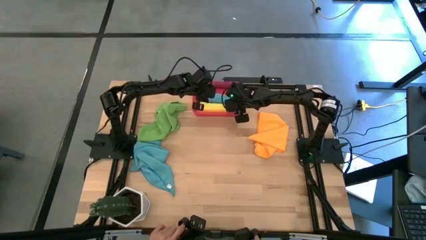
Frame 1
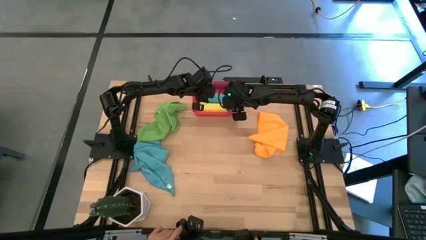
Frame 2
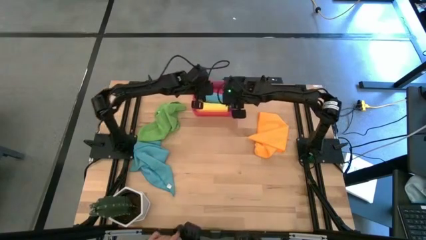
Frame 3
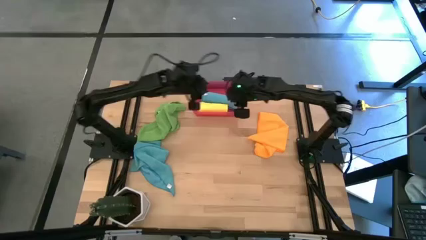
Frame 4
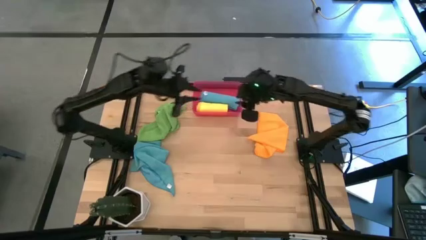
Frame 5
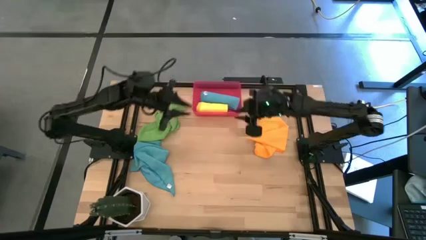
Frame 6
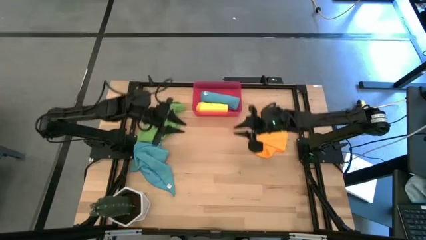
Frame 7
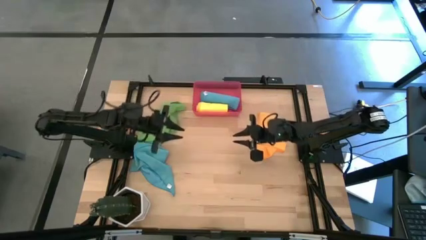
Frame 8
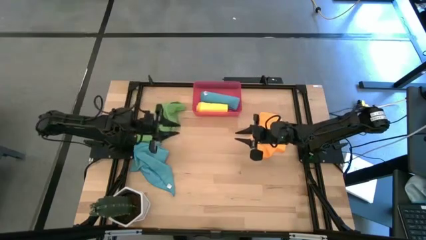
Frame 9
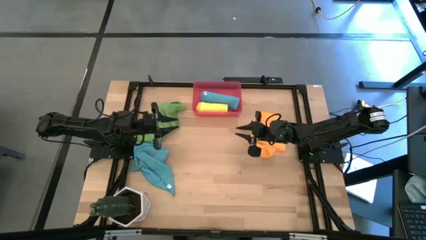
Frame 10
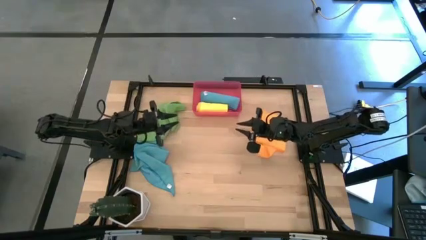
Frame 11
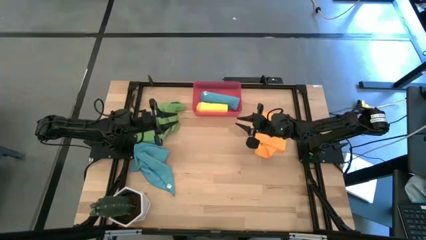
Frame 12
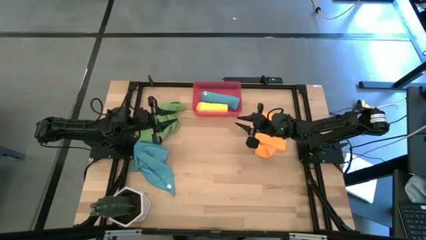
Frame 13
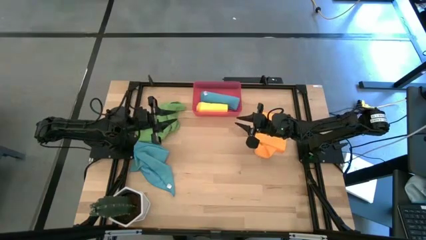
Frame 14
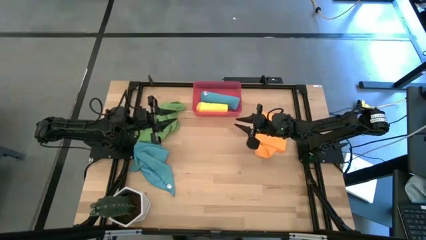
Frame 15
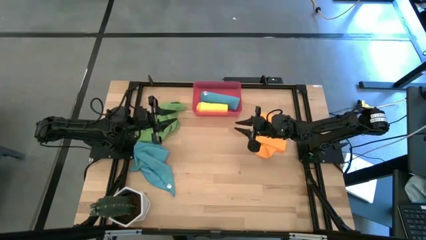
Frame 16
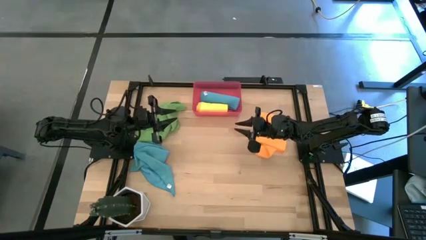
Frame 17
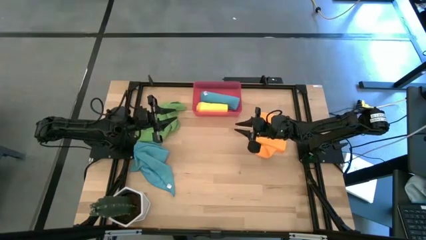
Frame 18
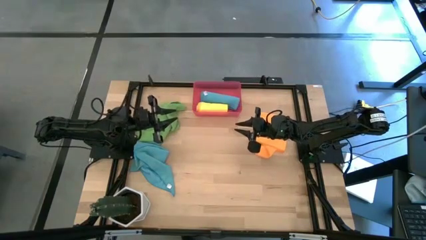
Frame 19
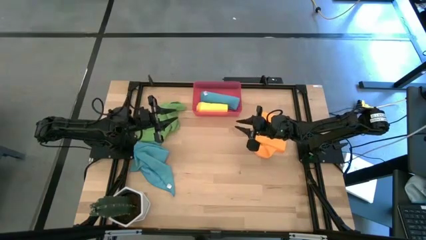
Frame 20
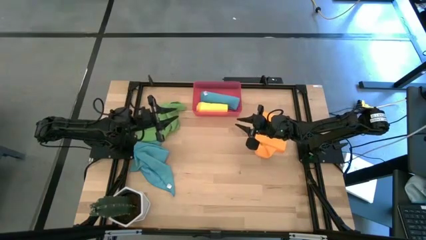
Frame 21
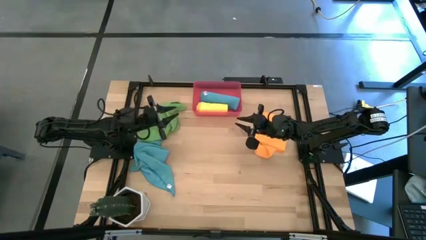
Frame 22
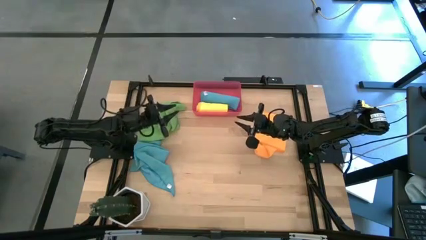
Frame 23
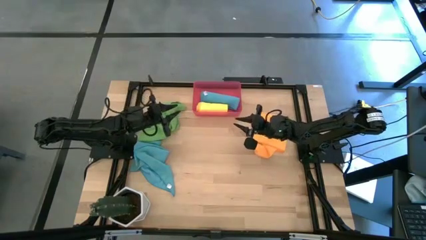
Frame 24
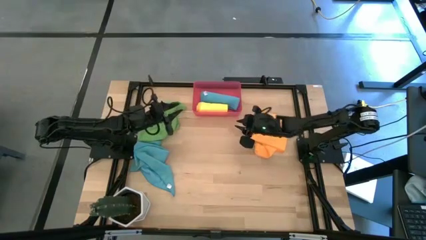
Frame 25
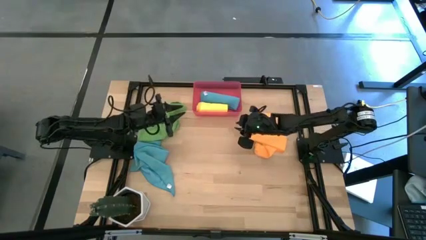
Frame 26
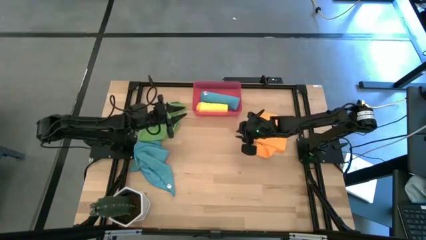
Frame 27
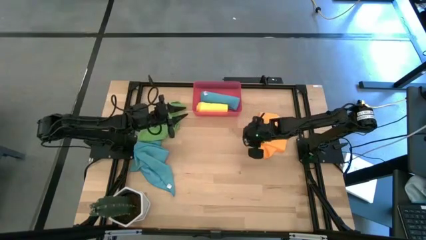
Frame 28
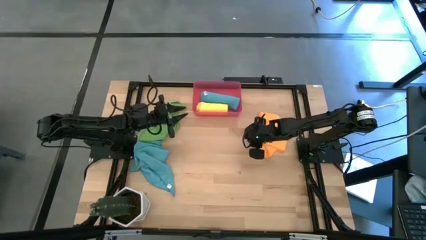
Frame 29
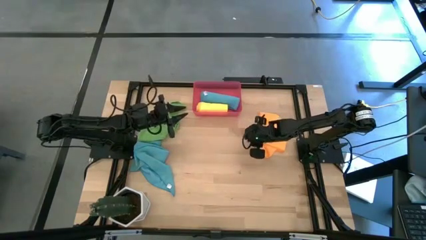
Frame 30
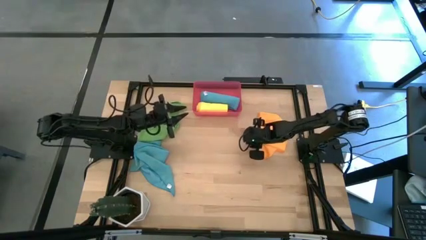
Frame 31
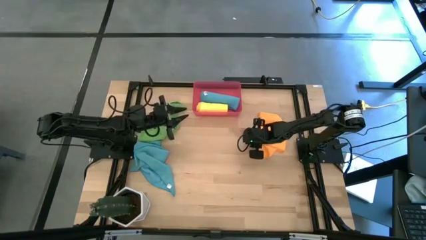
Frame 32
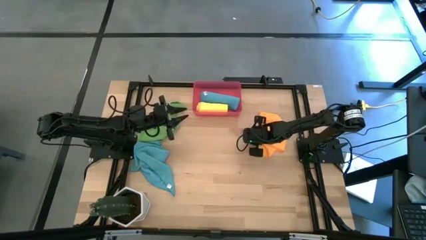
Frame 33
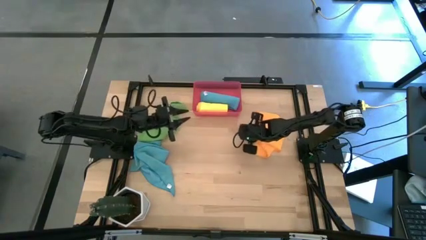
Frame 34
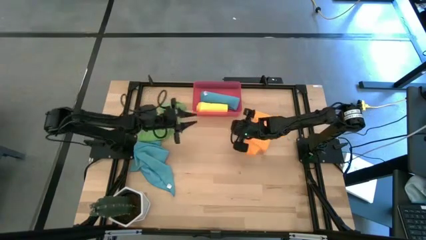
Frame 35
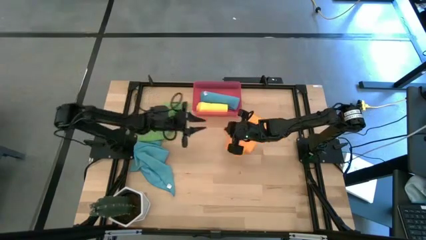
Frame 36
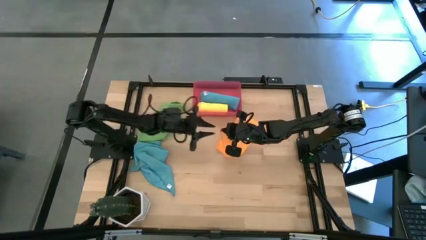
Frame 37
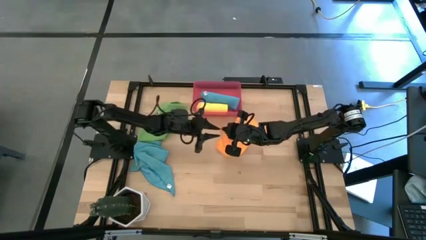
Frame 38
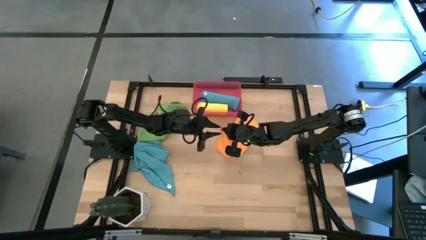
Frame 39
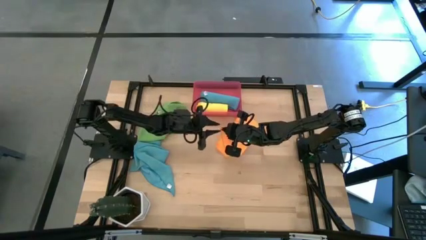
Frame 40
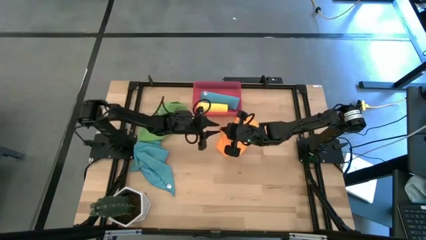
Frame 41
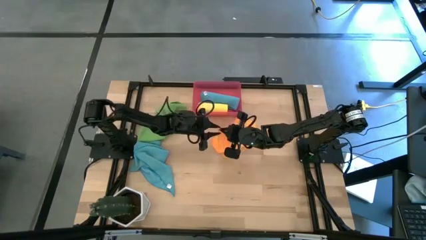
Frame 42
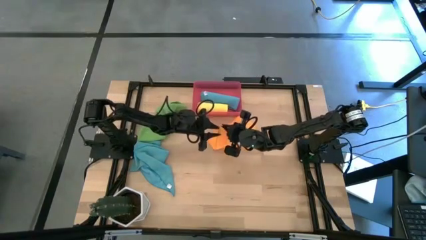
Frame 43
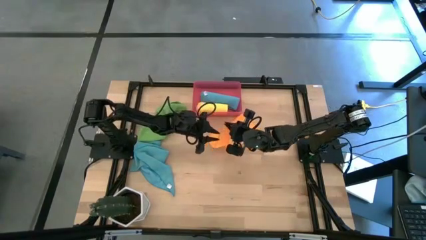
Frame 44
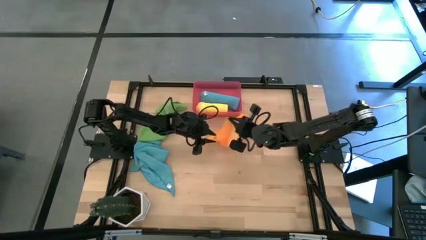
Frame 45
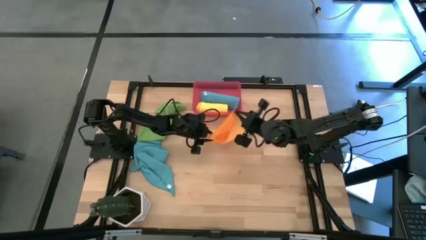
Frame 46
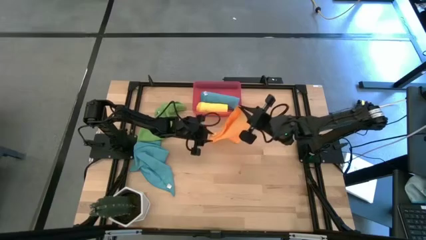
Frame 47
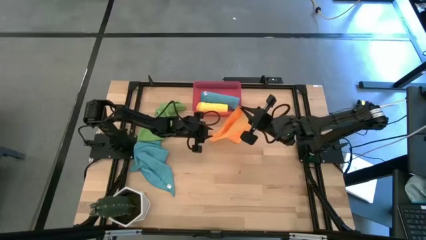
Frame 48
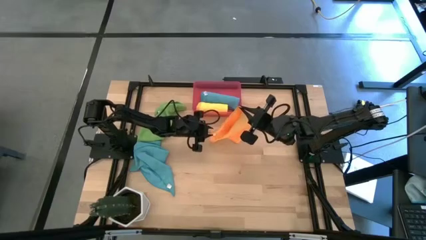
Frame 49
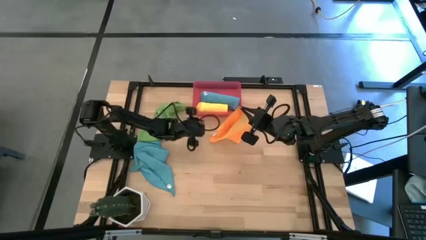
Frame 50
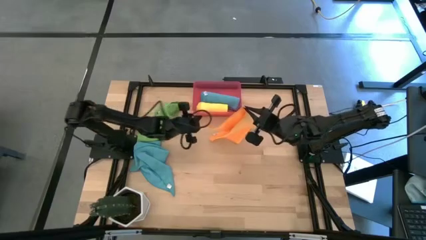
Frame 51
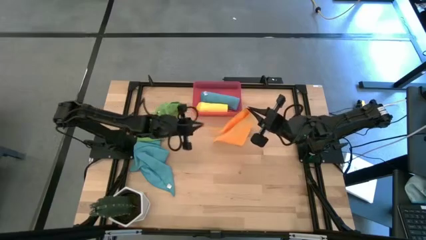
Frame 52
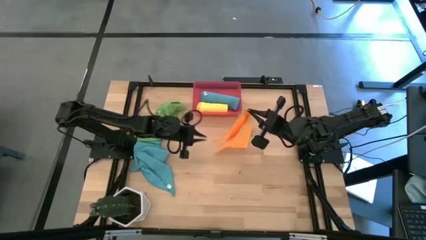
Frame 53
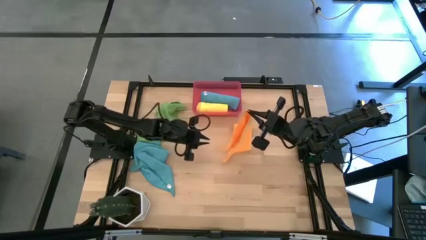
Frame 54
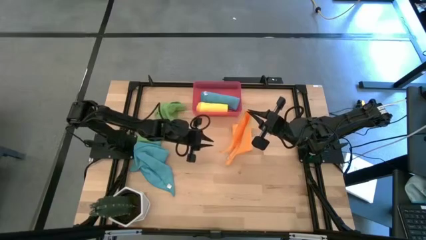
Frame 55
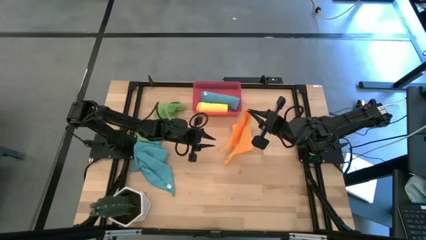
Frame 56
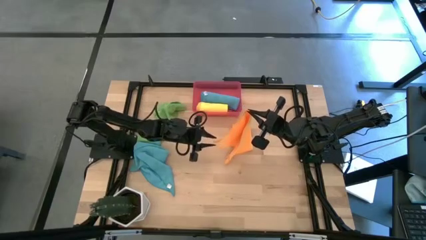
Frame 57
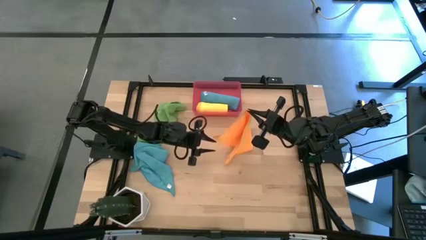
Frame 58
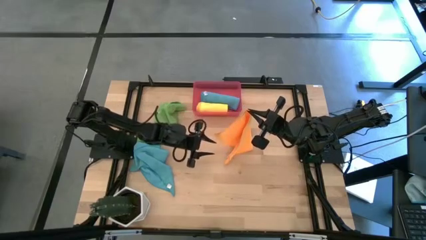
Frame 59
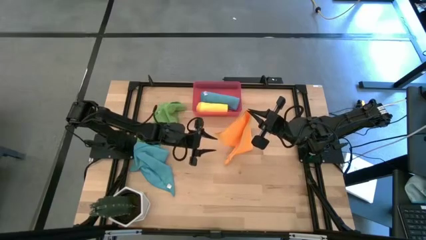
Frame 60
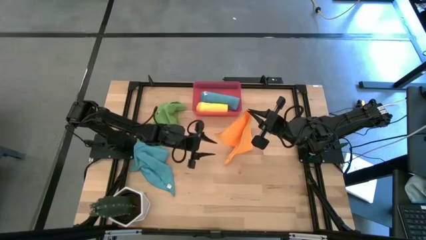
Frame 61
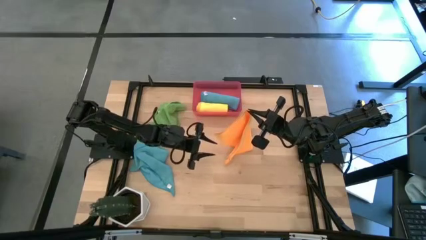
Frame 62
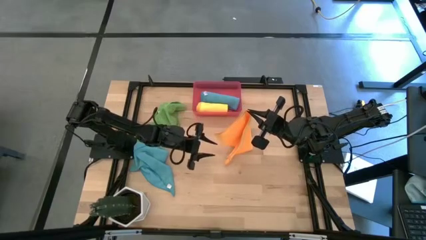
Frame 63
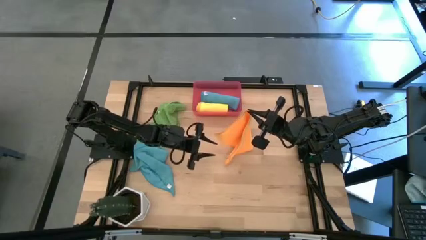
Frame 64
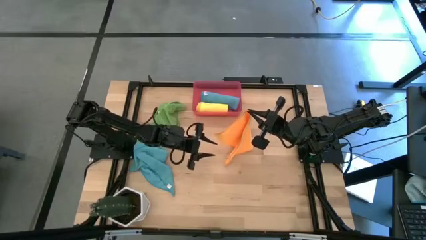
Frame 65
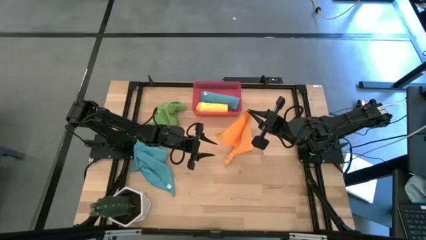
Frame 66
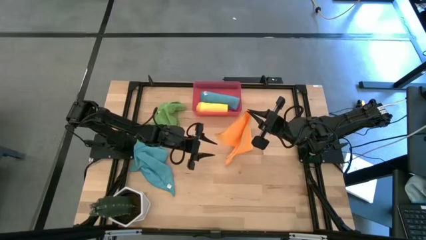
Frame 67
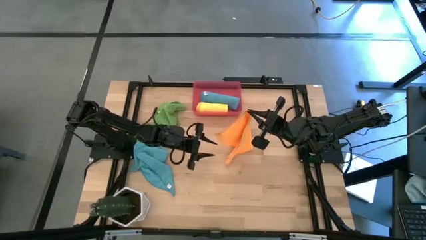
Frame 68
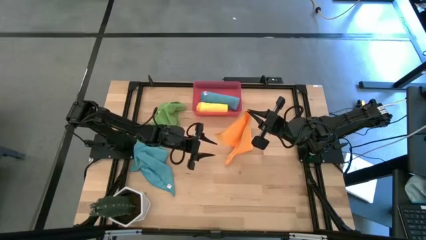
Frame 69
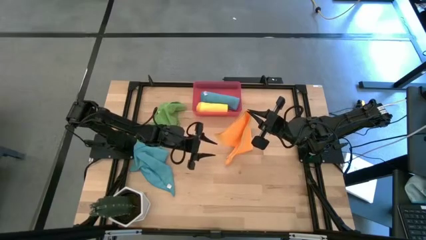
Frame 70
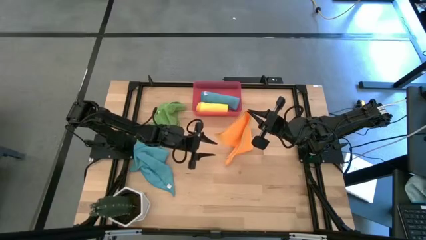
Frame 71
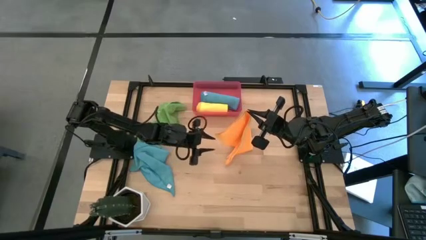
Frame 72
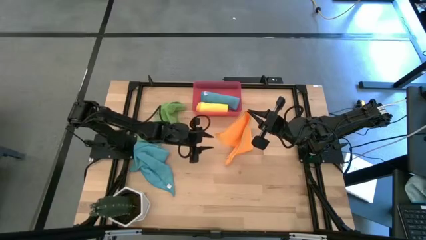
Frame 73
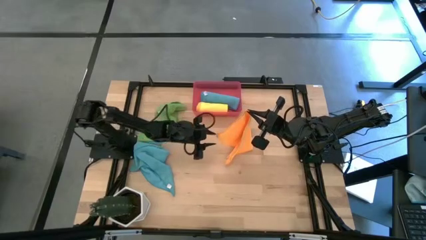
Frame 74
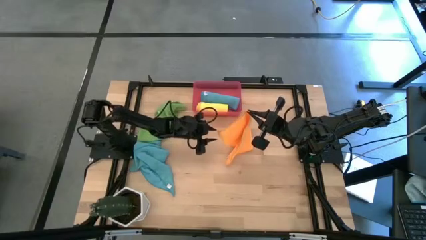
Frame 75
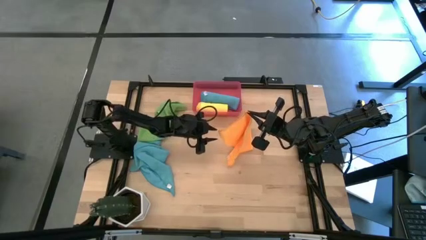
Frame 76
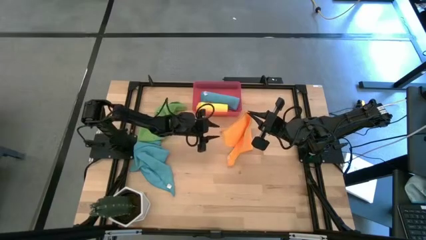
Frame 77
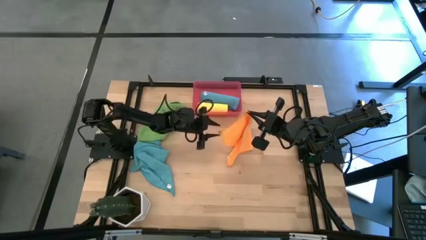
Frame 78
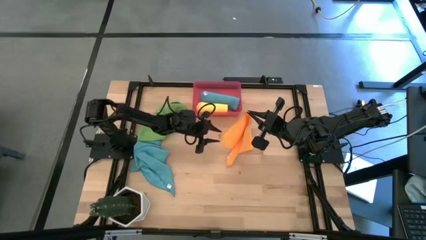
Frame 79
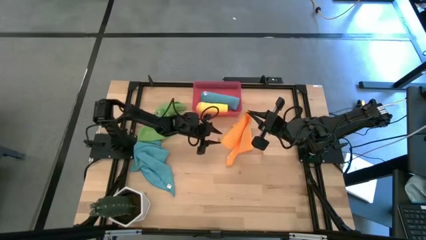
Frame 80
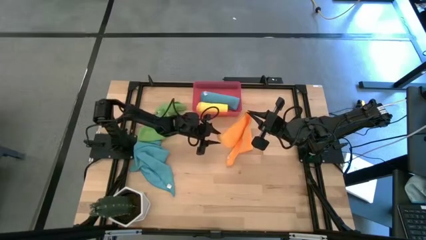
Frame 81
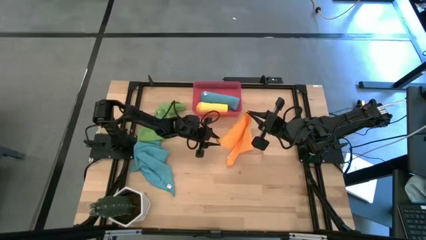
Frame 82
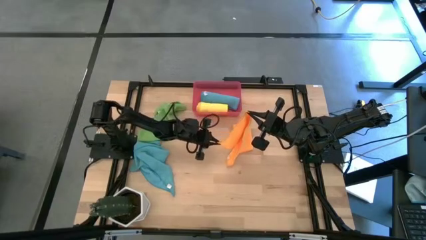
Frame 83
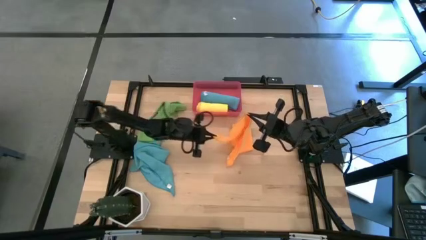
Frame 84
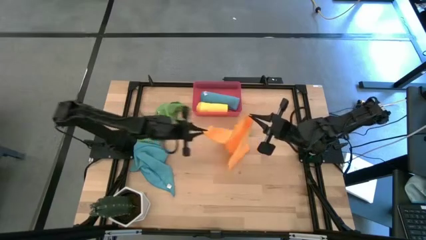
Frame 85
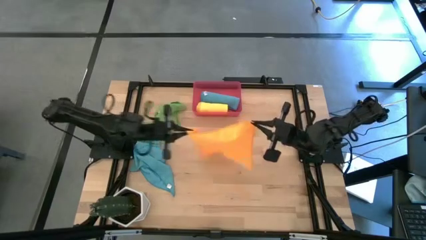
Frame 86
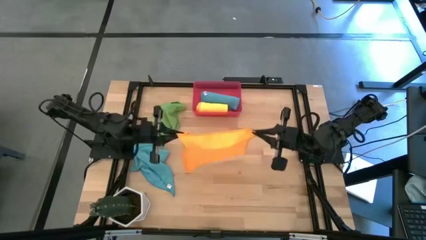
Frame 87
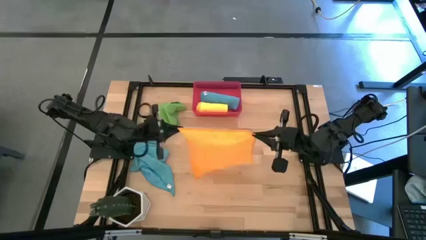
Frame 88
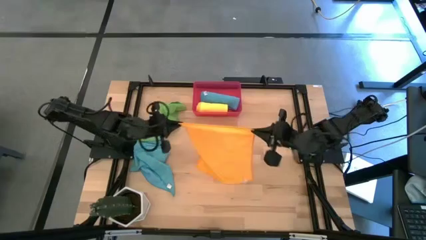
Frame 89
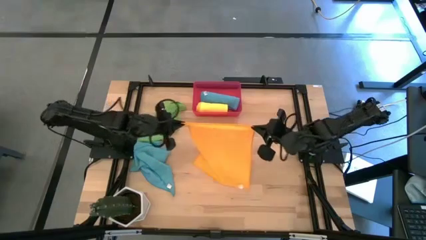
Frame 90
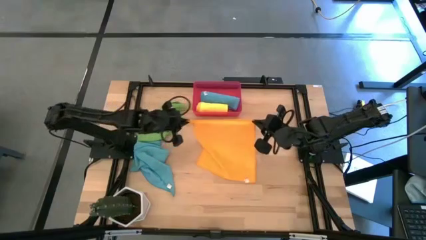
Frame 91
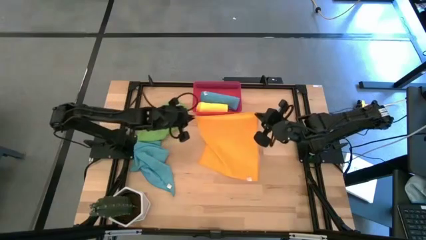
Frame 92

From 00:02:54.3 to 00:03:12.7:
Task: Roll microfiber towels into tight, uniform cylinder then place into a basket
Roll the orange microfiber cloth
